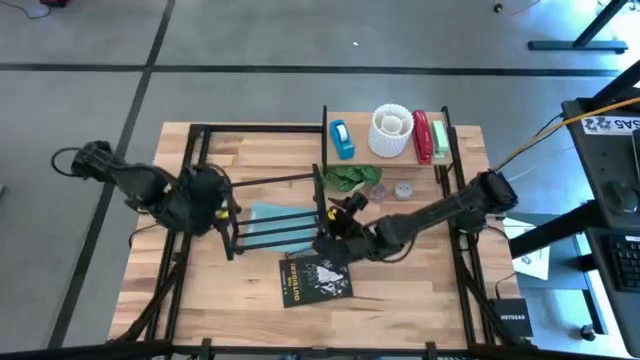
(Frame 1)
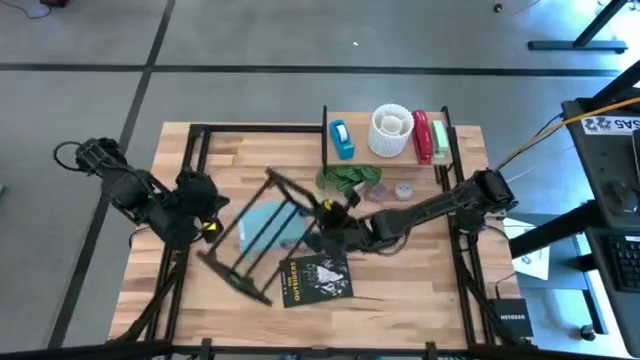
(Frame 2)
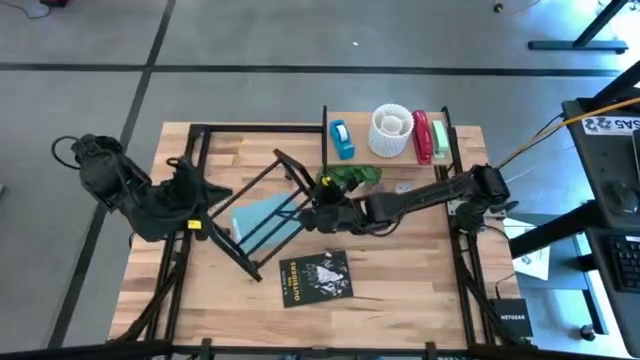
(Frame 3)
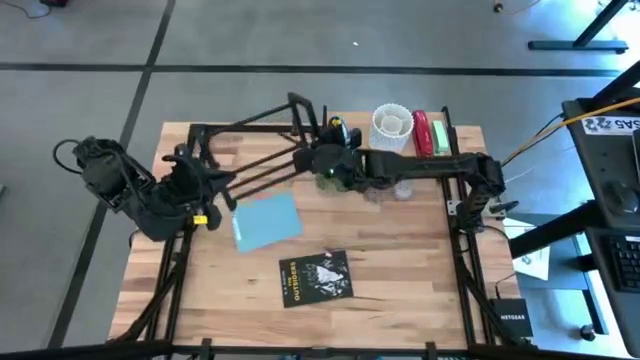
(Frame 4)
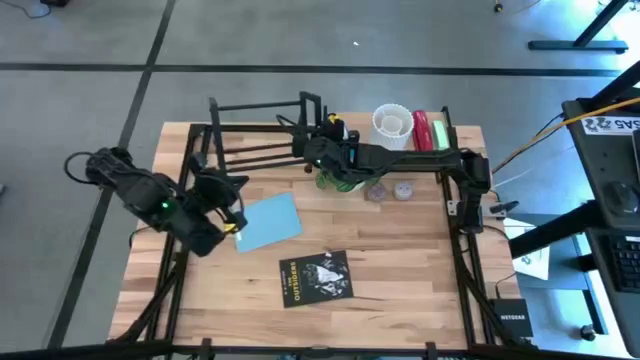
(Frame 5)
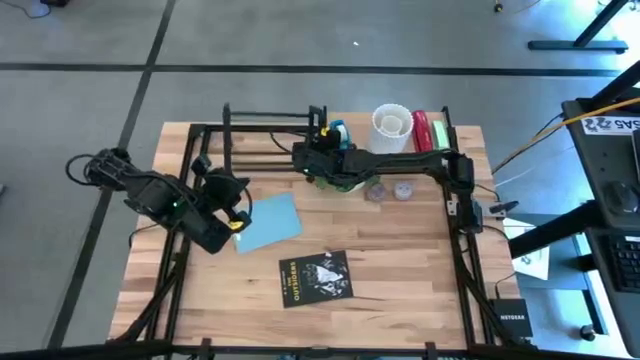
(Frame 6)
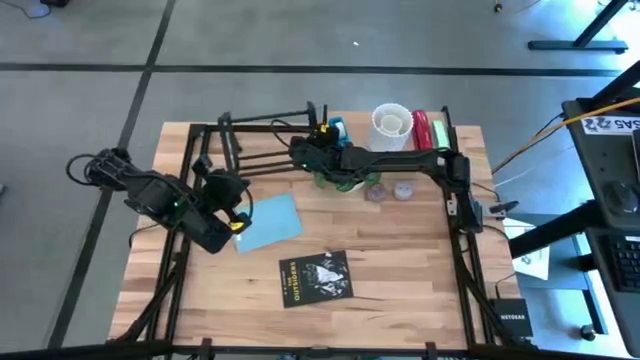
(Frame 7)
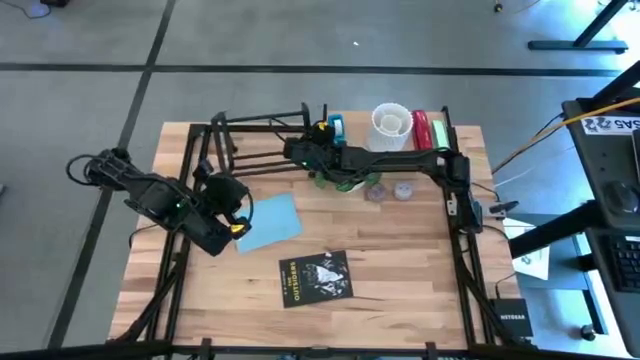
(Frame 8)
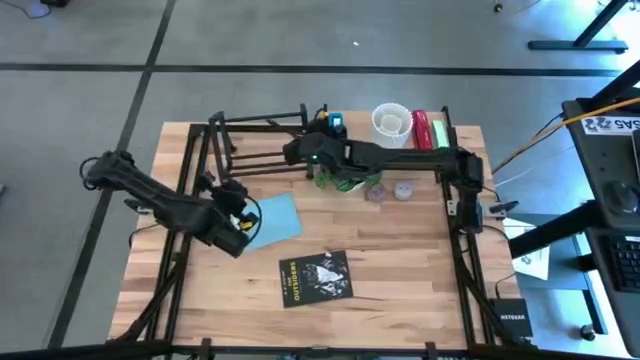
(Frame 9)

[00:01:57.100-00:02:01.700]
Task: Stock shelves
Move the bookshelf from the middle left to the top left of the table

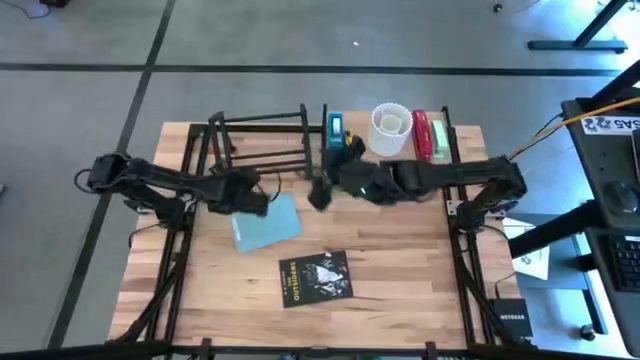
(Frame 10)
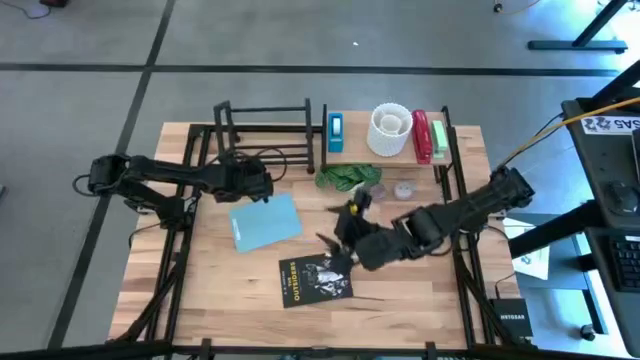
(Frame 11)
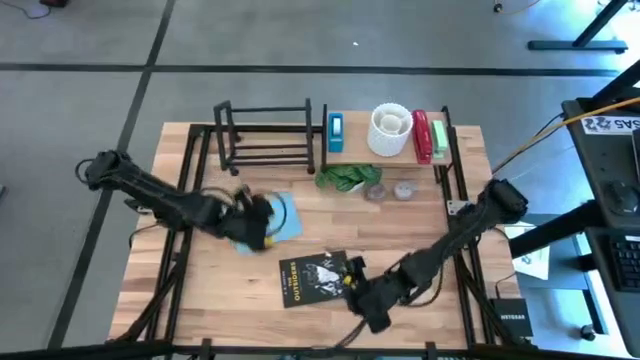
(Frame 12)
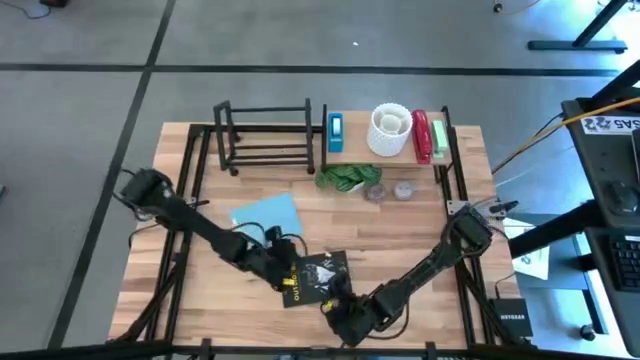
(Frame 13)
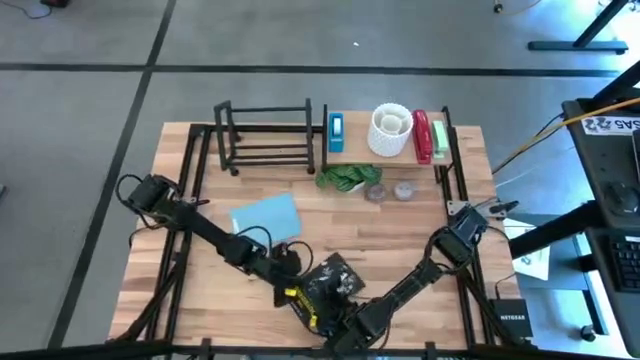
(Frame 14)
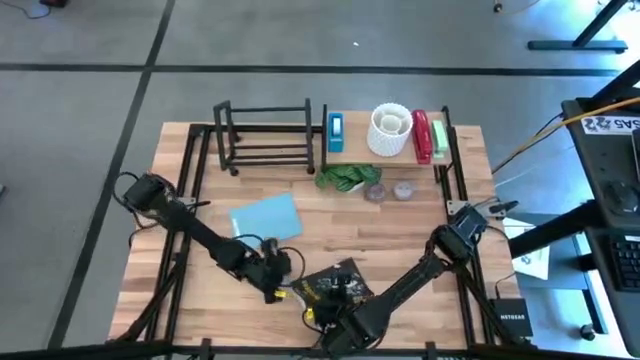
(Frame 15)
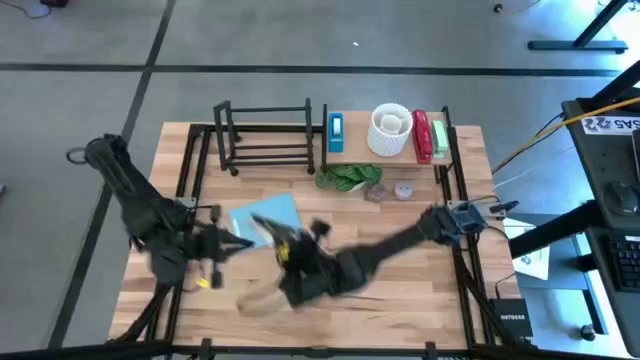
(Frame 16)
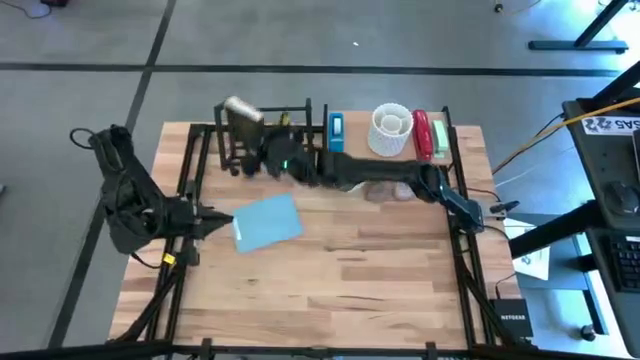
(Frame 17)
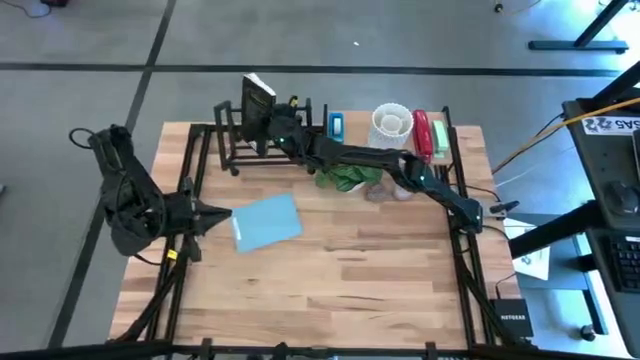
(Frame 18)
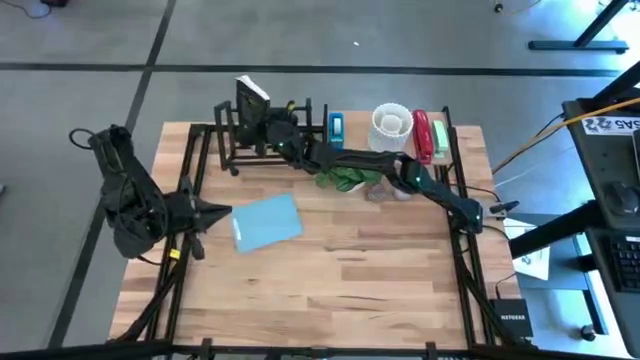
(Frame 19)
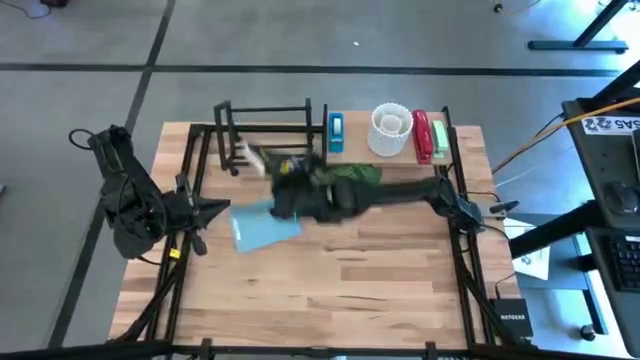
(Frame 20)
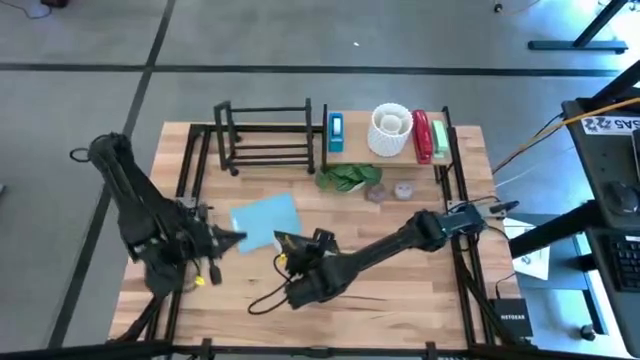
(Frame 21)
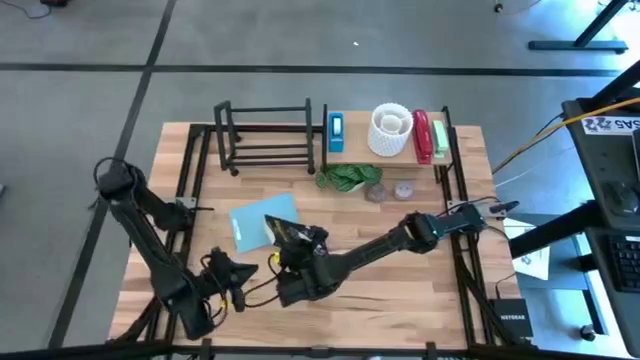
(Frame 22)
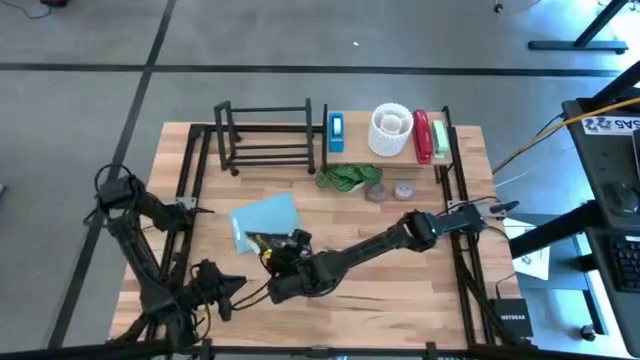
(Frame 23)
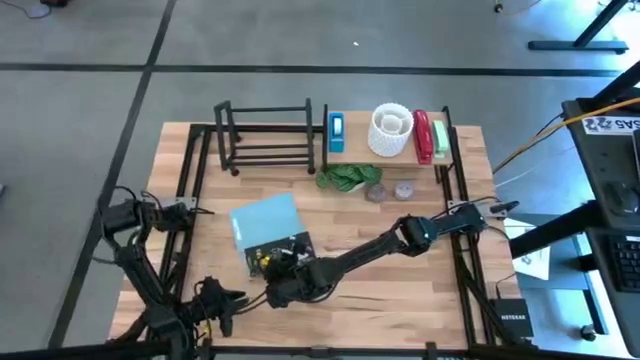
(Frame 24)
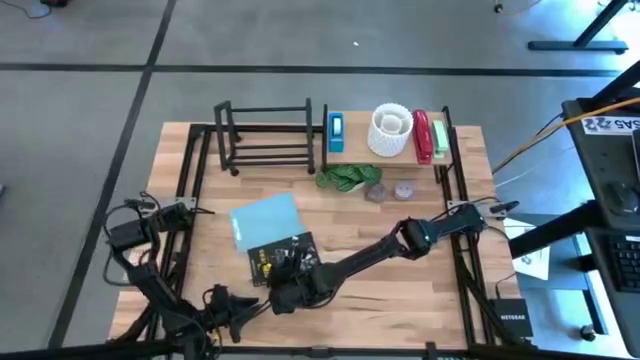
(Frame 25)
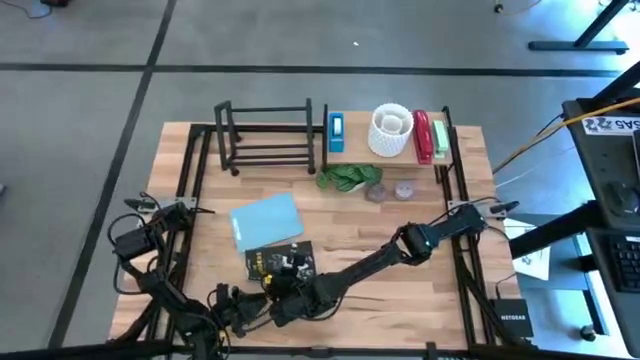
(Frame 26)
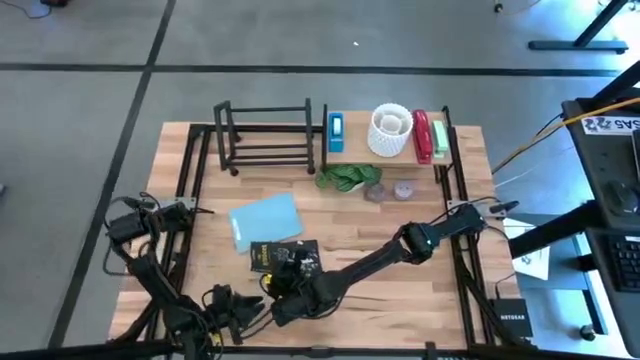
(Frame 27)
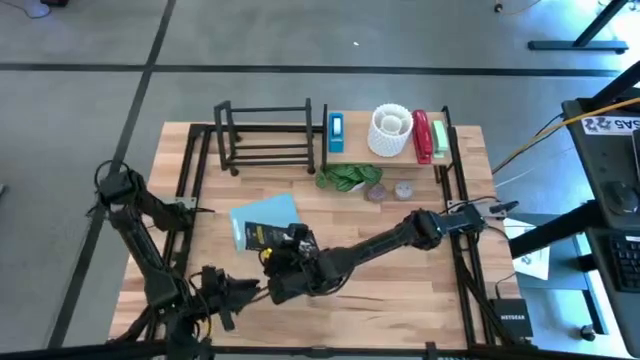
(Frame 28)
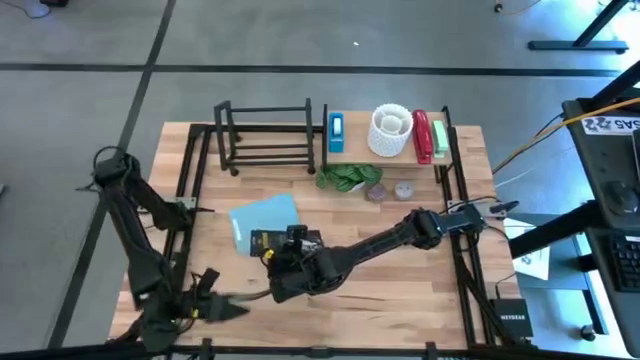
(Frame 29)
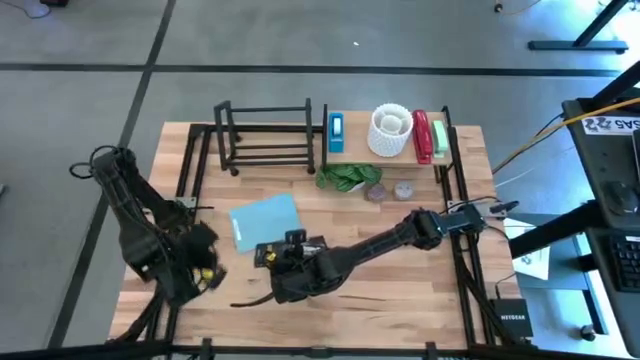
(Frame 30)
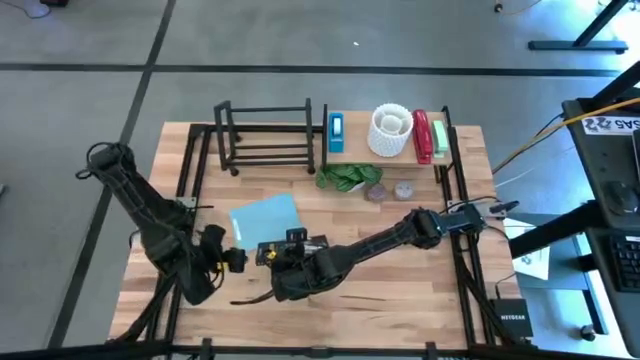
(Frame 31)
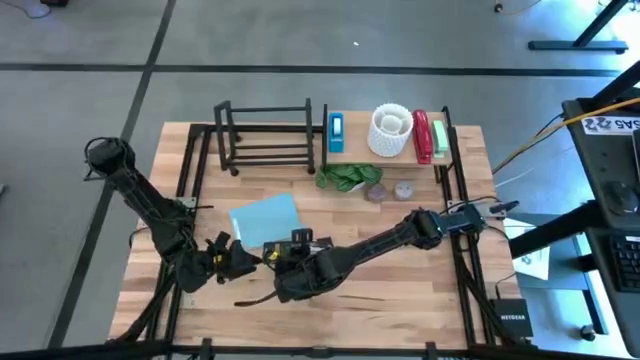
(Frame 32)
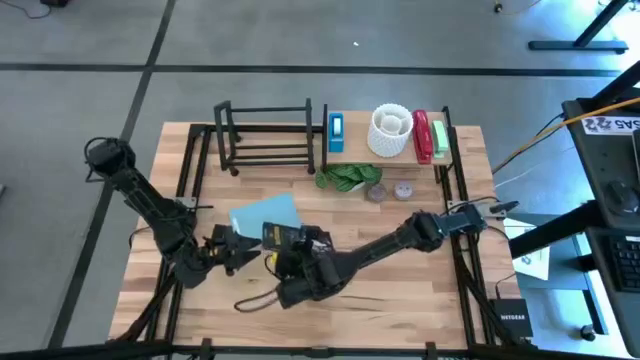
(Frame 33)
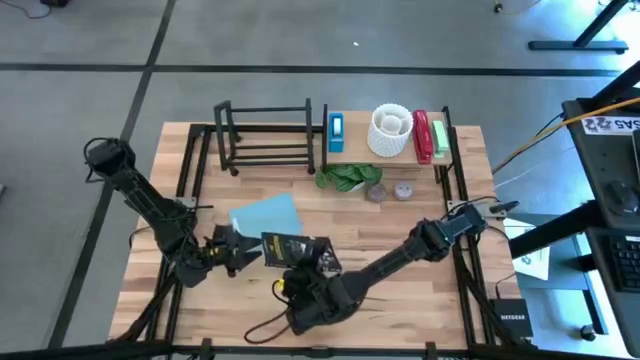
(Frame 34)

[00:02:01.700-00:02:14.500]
Put the black book on the bookshelf

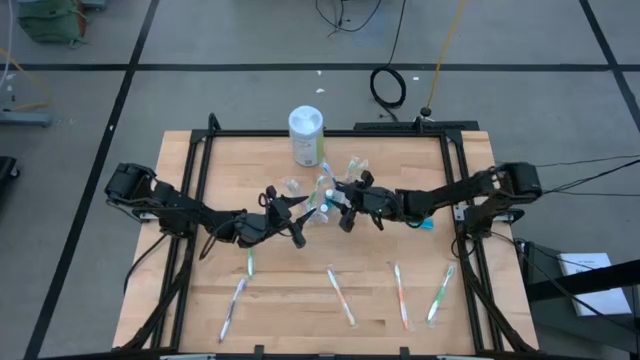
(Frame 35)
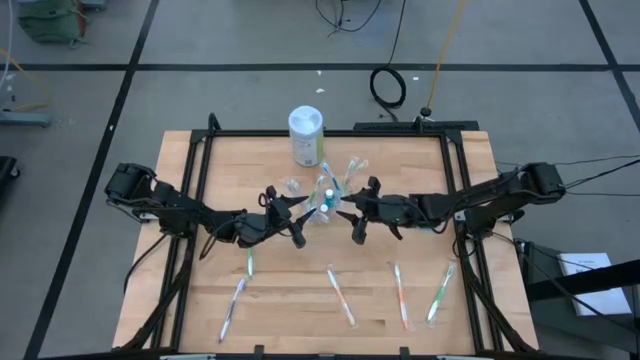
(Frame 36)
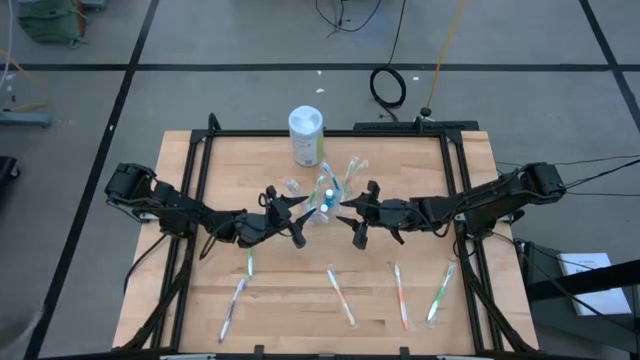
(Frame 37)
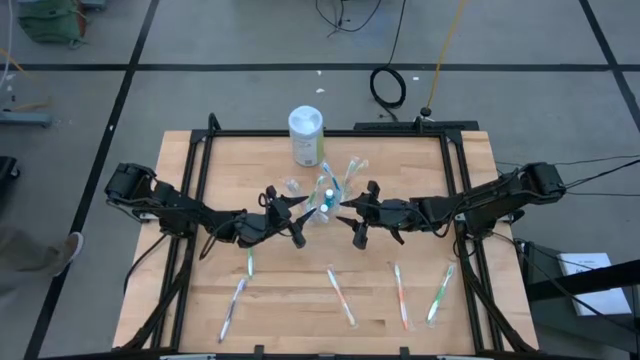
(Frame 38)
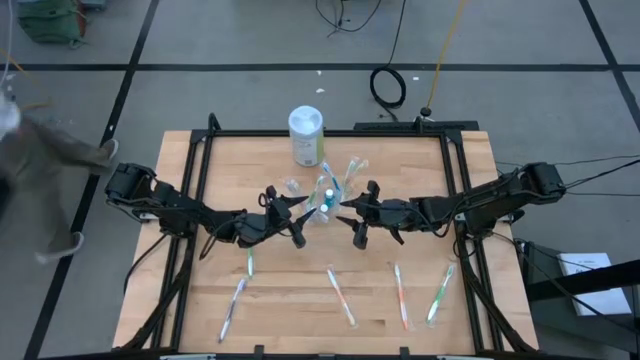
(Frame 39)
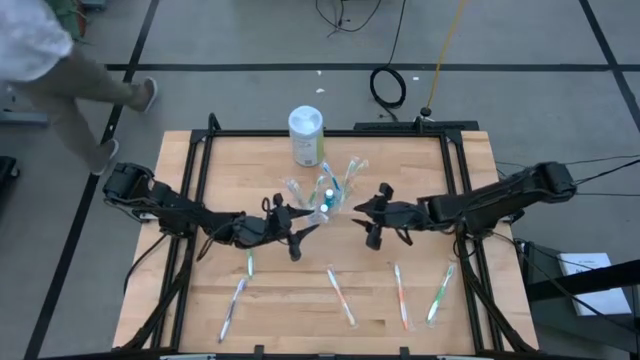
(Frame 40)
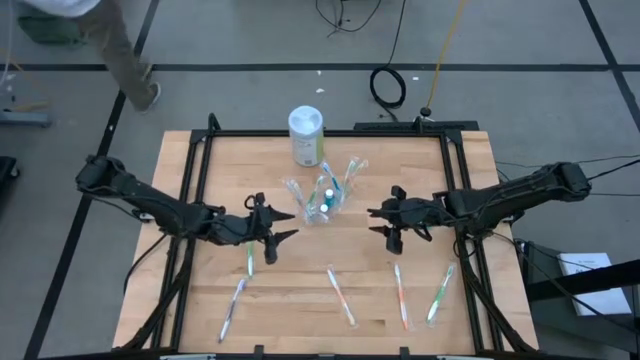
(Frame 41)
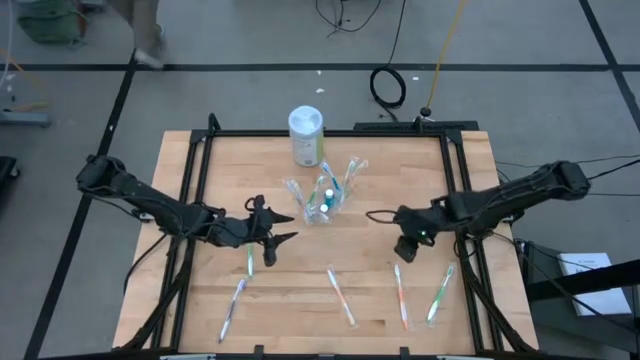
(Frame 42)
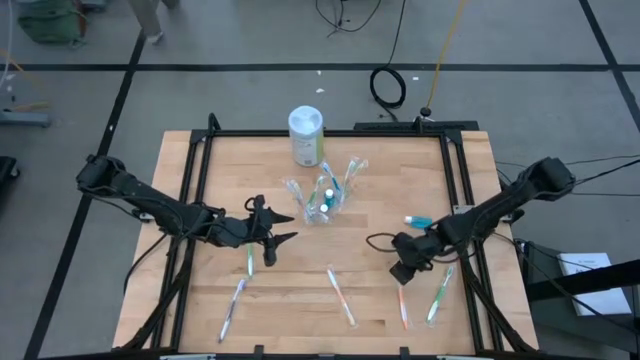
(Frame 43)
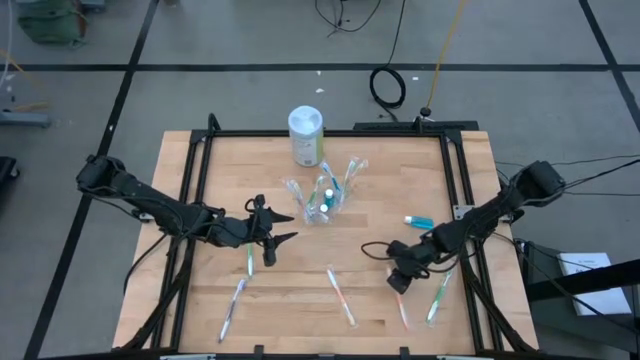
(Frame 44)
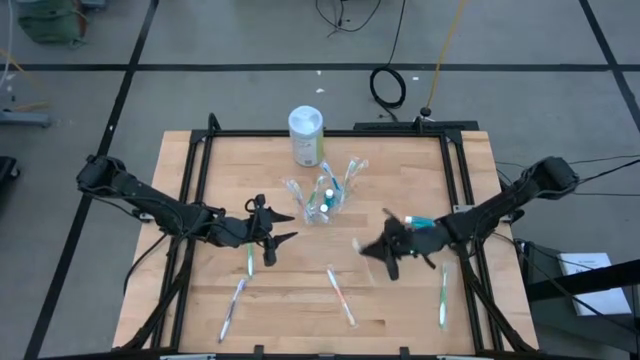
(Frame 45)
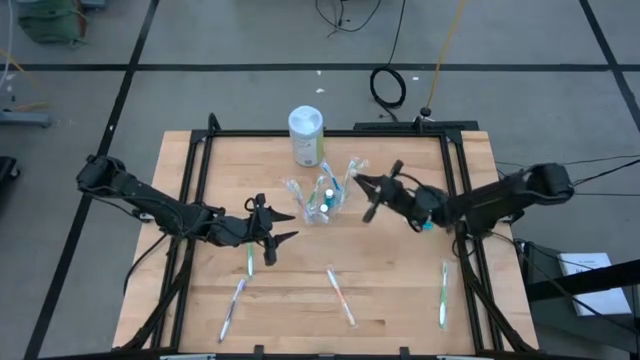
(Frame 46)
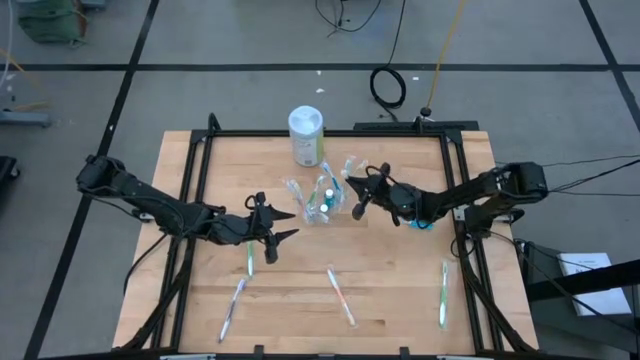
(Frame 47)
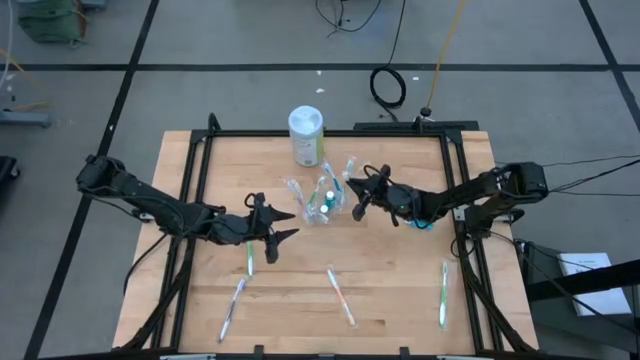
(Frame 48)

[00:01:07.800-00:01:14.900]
Task: Pick & Place toothbrushing station
Put the orange toothbrush into the transparent organizer
